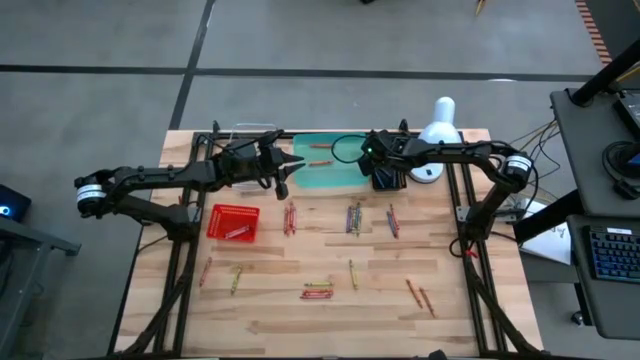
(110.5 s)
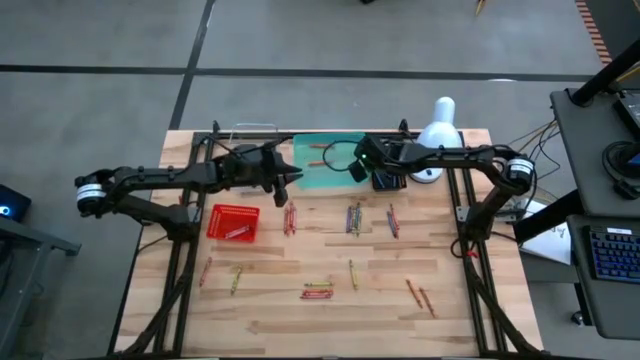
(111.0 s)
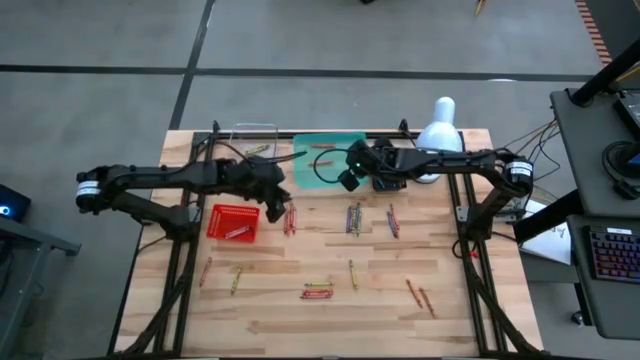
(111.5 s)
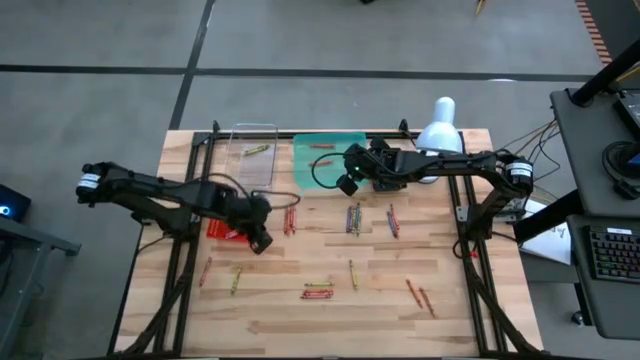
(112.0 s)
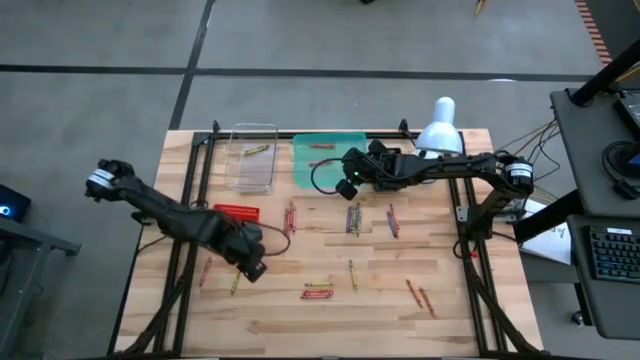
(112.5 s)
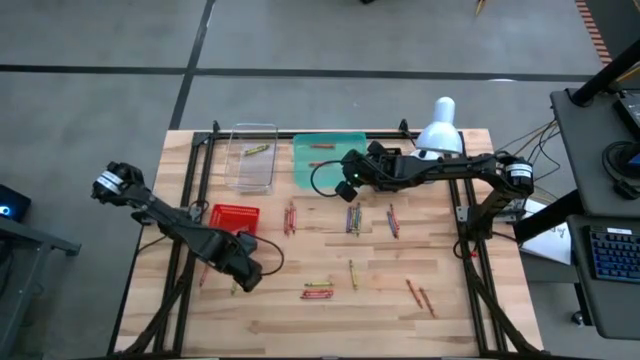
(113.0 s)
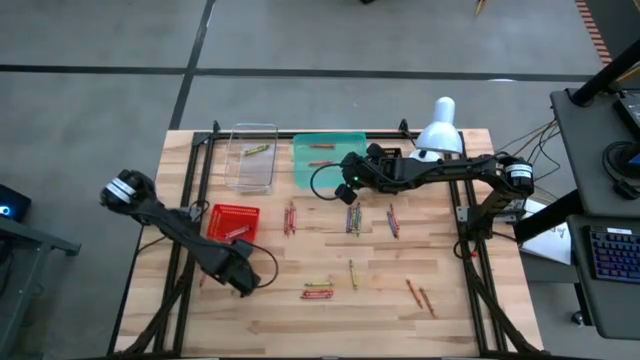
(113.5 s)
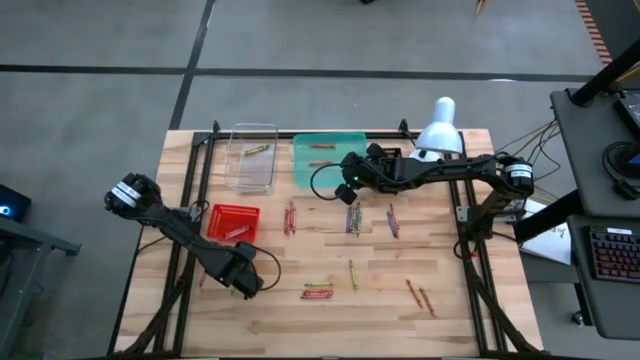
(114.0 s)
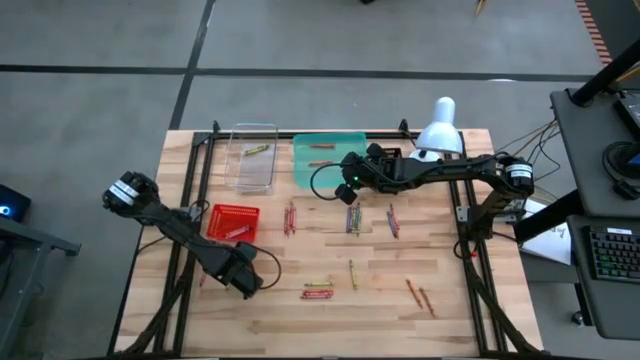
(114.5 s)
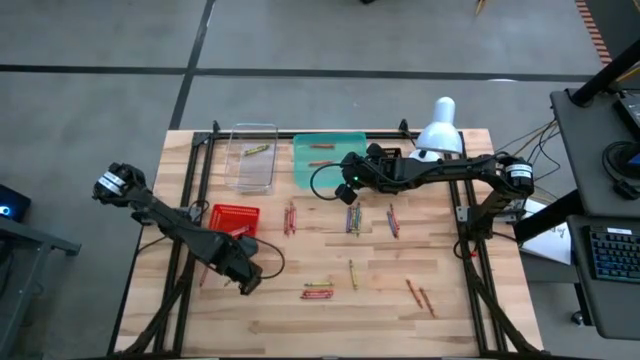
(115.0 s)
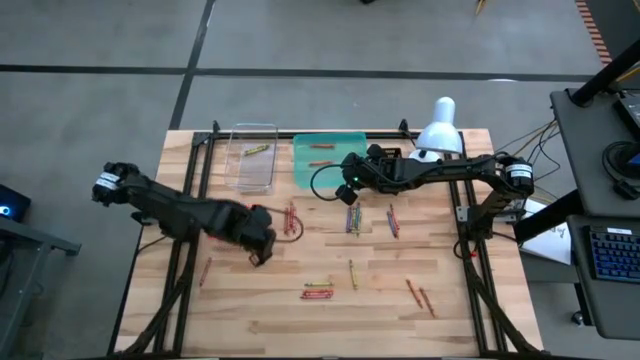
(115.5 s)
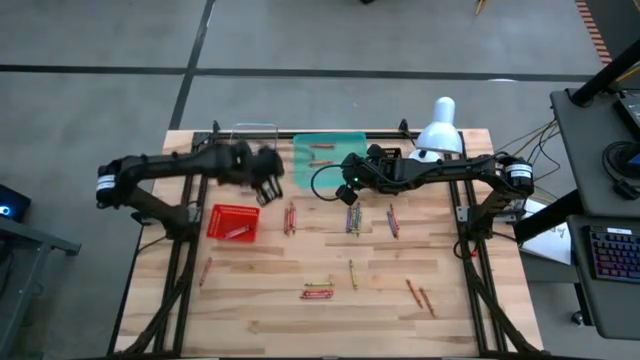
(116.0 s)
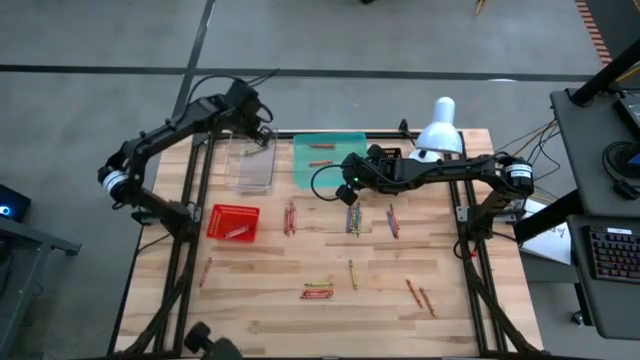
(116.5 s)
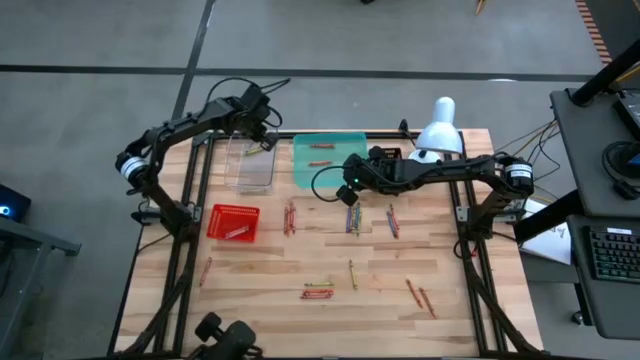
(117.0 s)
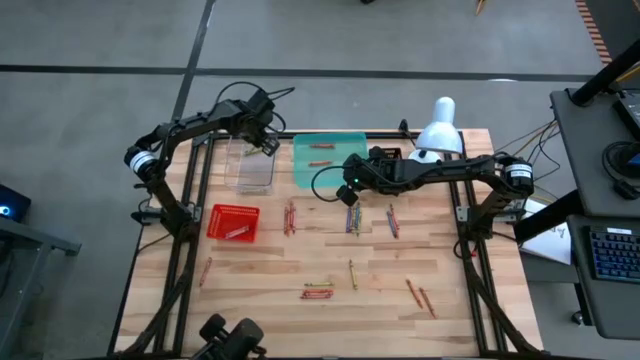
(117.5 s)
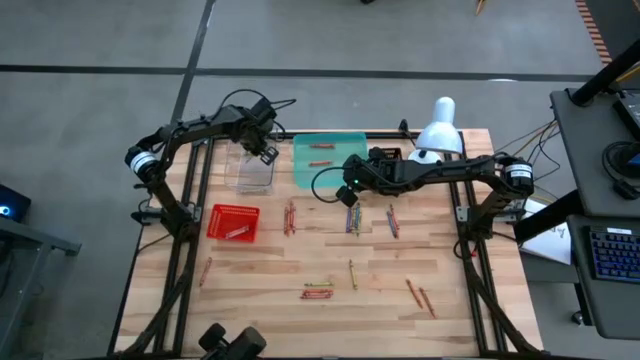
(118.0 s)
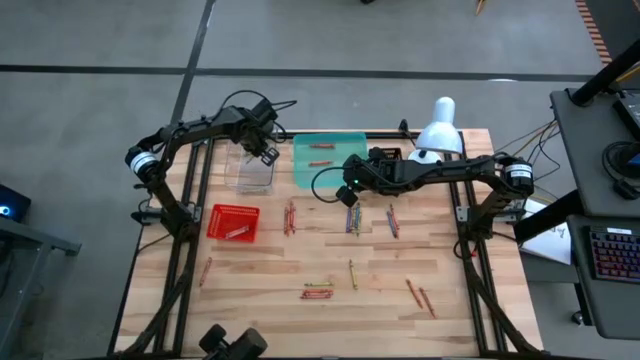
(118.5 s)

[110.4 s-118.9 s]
Task: Sort crayons
Put the green crayon into the transparent bin

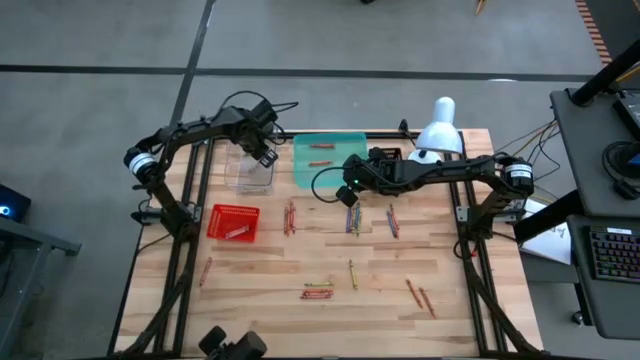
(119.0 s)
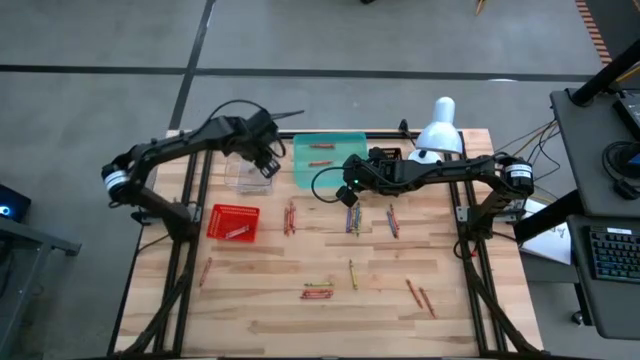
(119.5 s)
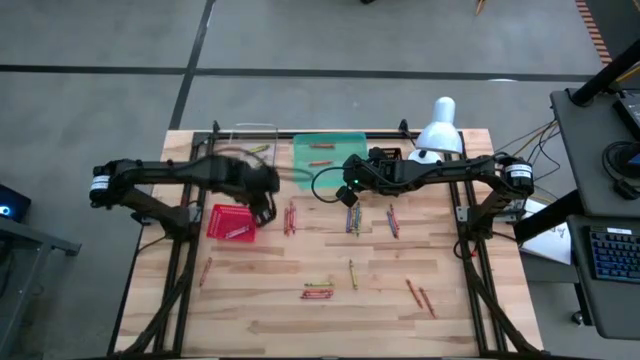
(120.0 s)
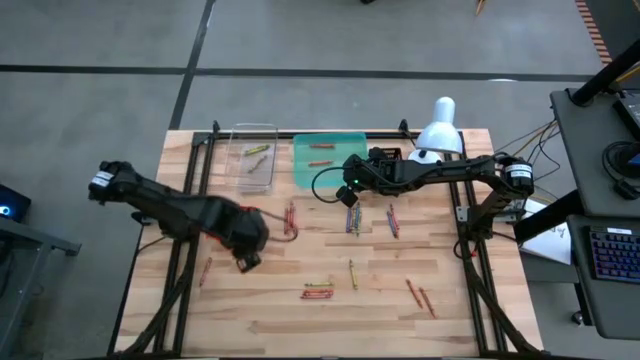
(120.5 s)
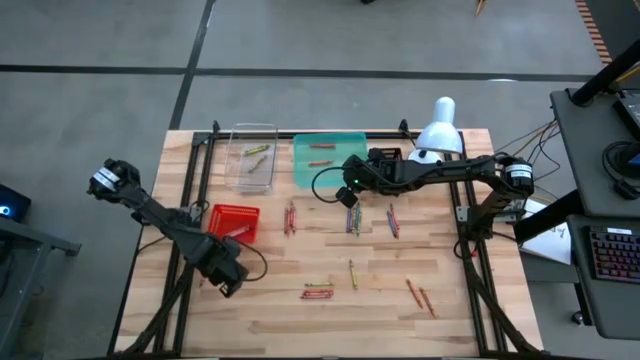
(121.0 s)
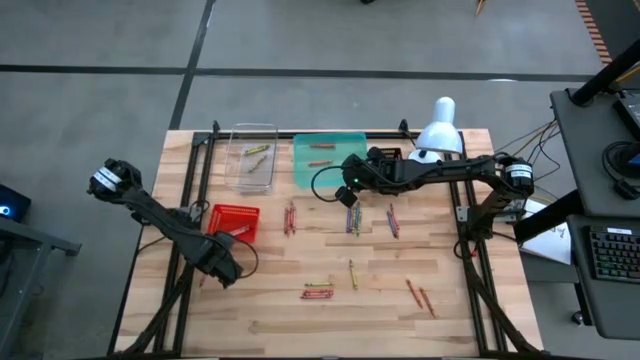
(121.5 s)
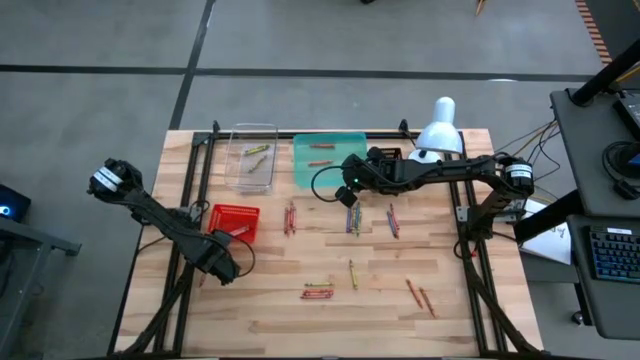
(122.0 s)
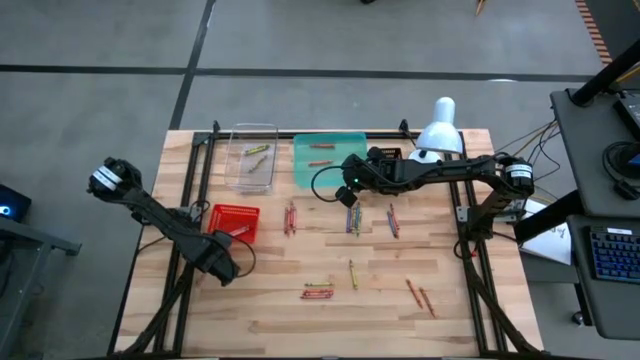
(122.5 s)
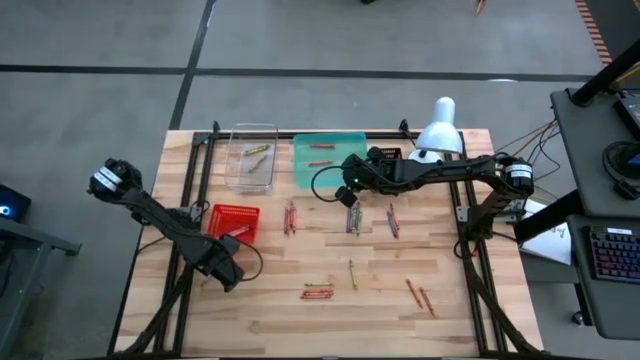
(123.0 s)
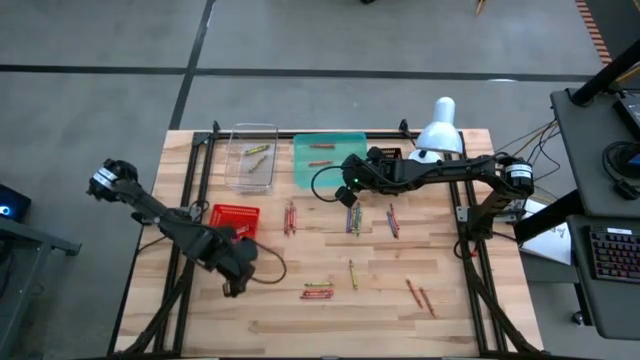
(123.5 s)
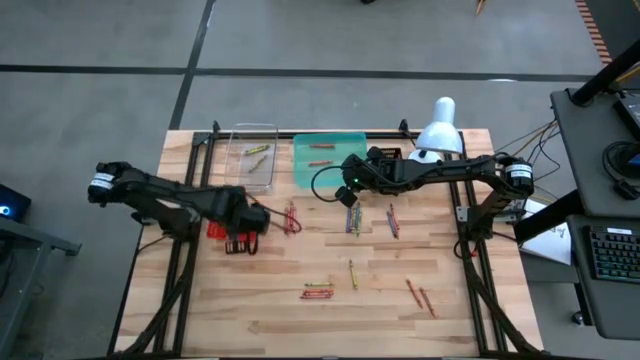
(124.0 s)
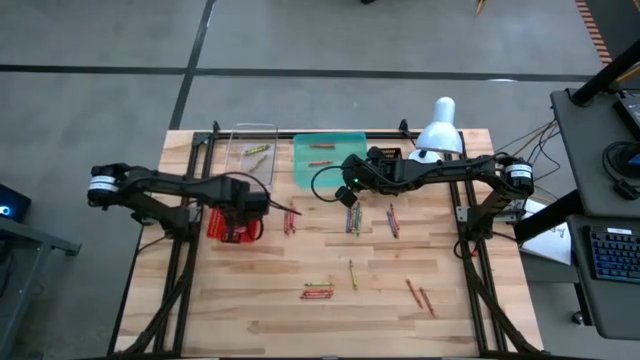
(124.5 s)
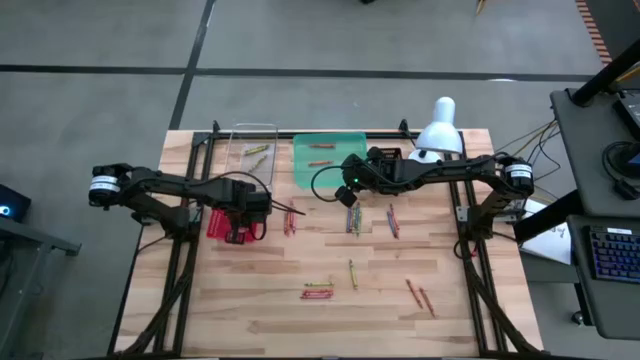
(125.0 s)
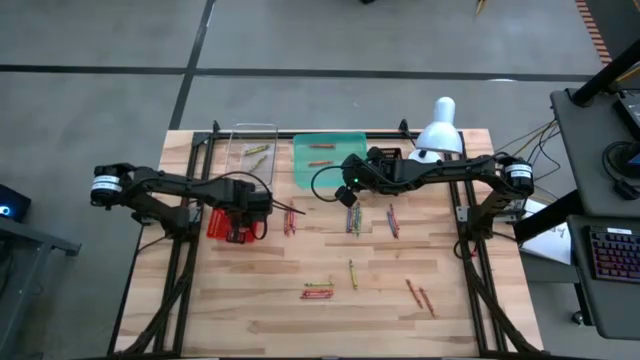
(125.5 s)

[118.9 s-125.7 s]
Put the red crayon into the red bin

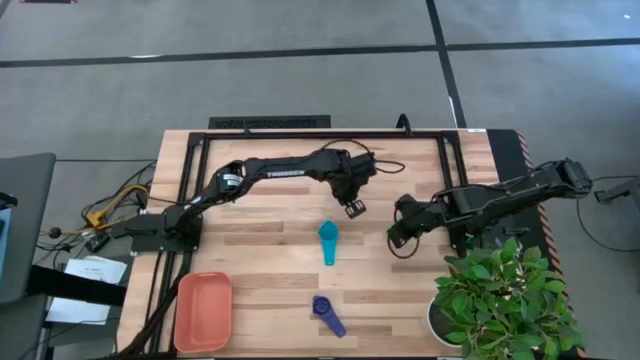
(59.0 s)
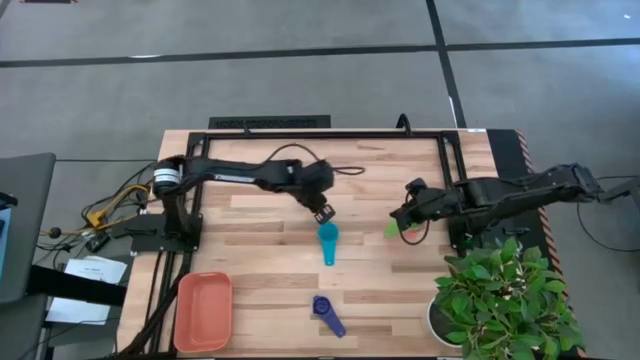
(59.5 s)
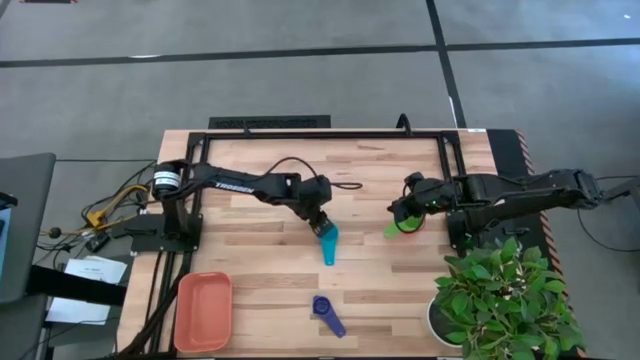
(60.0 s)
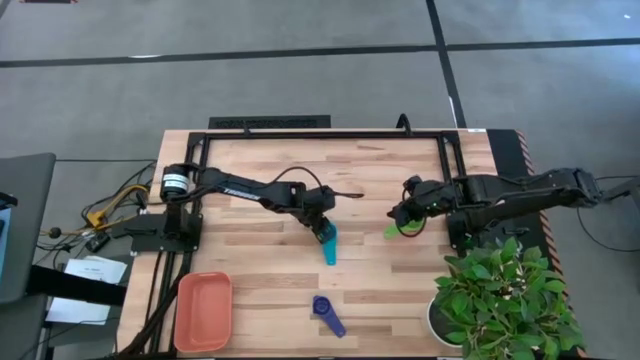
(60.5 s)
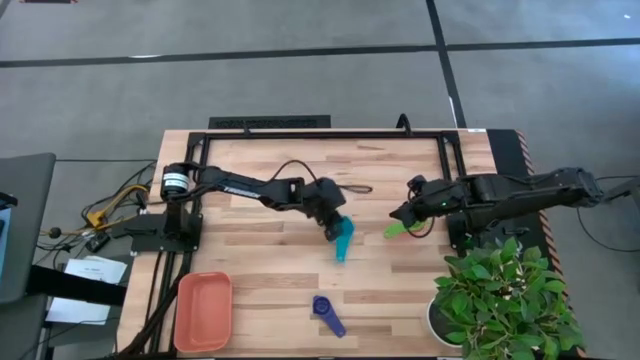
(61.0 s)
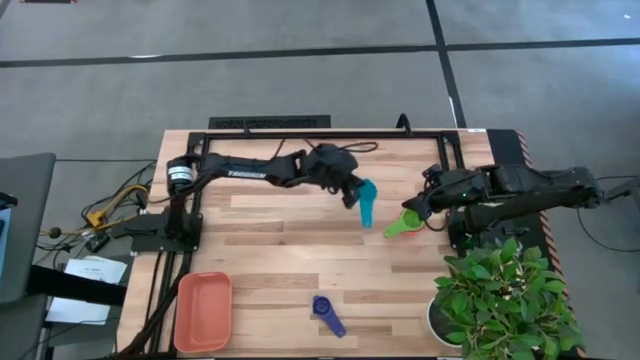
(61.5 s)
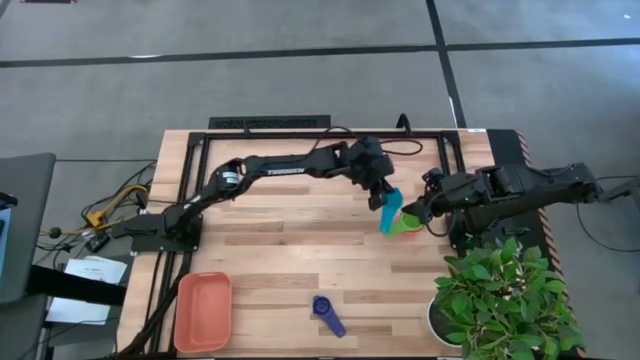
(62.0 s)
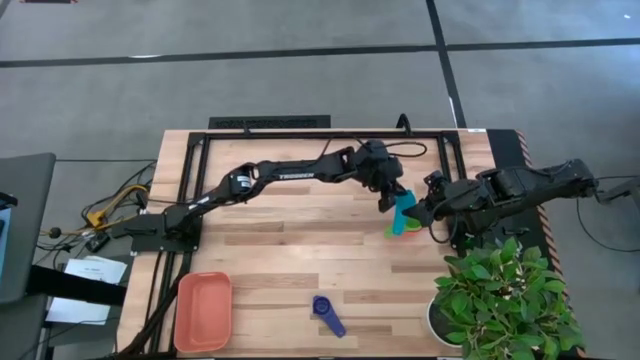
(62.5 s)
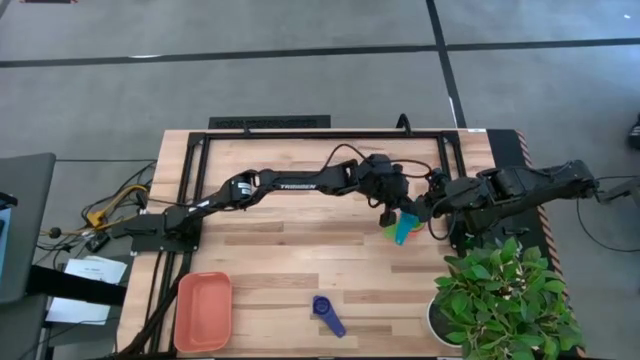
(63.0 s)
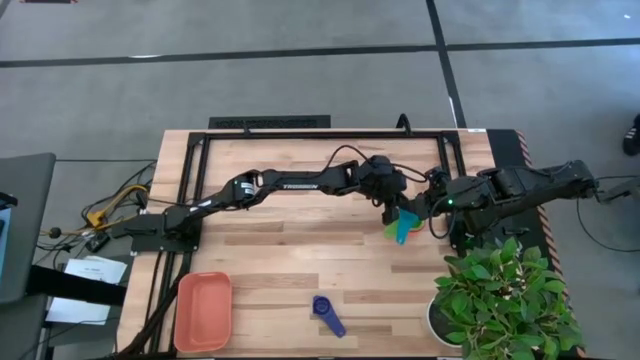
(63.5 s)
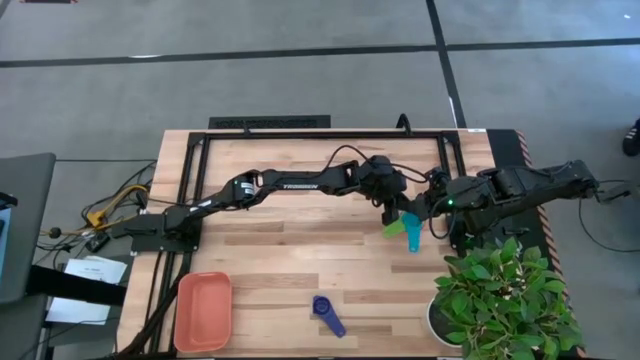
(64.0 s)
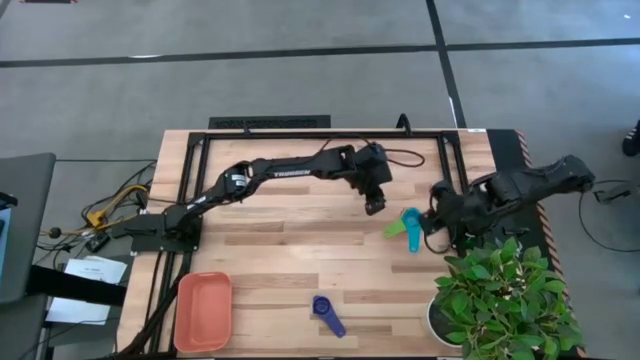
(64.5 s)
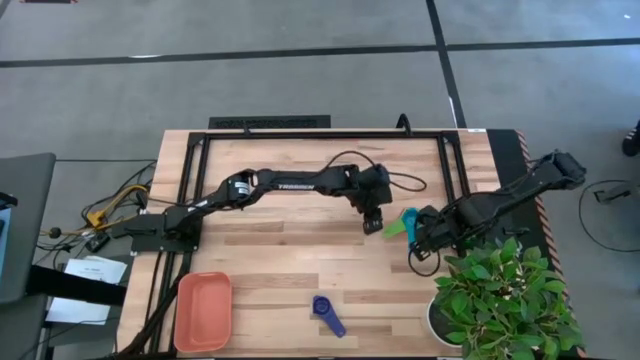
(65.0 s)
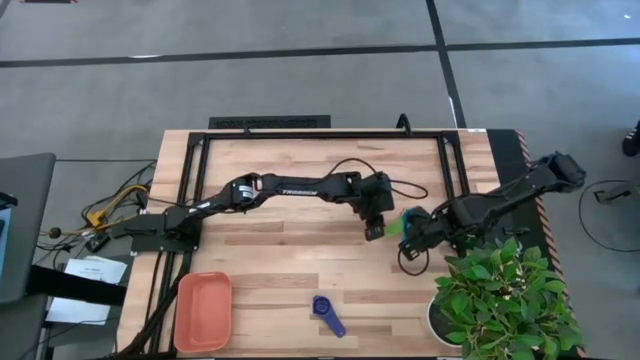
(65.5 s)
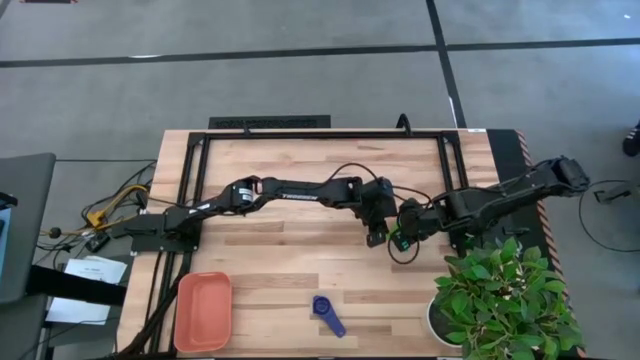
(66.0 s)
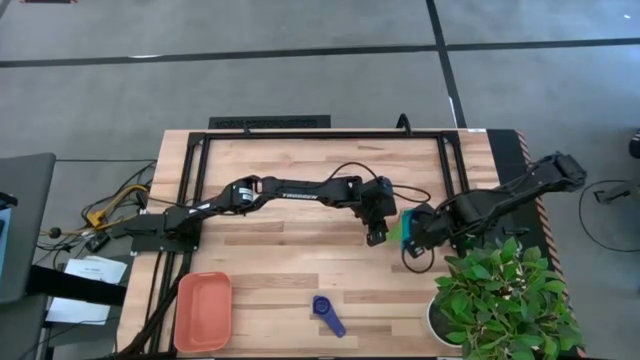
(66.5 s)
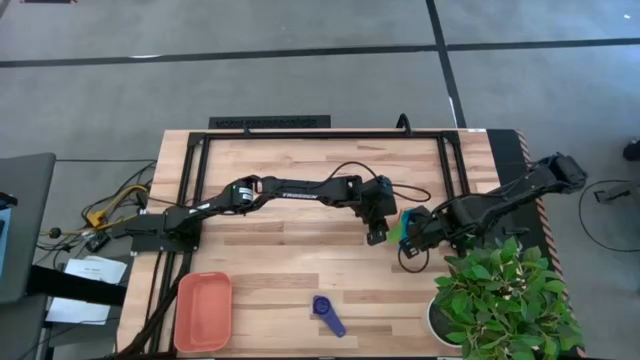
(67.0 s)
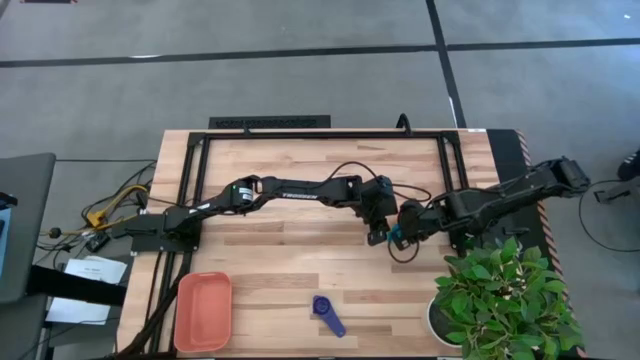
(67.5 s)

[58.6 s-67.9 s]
Task: Nest measuring cups in basket
Stack the light blue measuring cup on top of the green measuring cup
